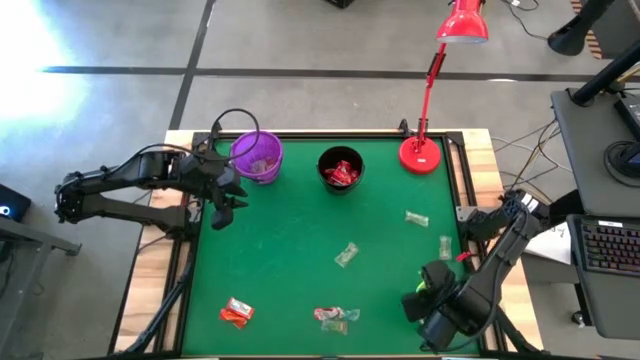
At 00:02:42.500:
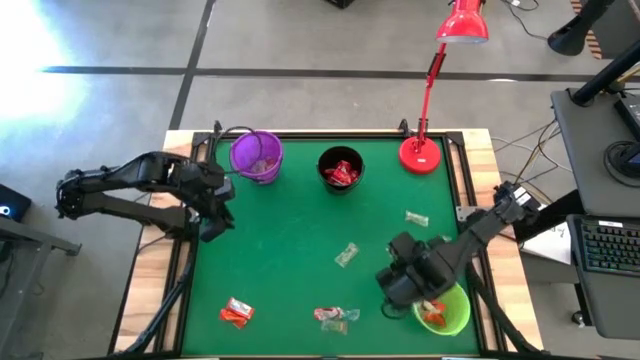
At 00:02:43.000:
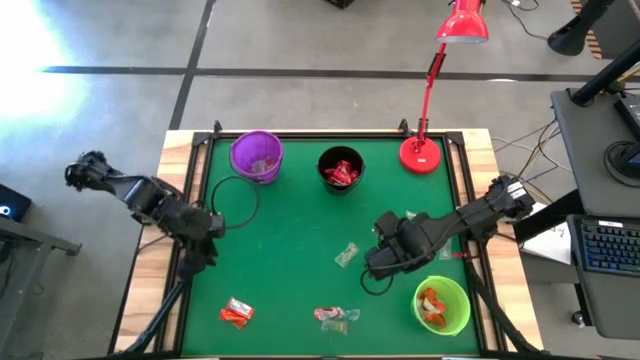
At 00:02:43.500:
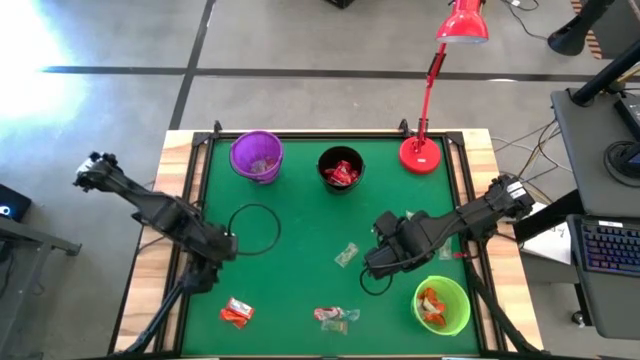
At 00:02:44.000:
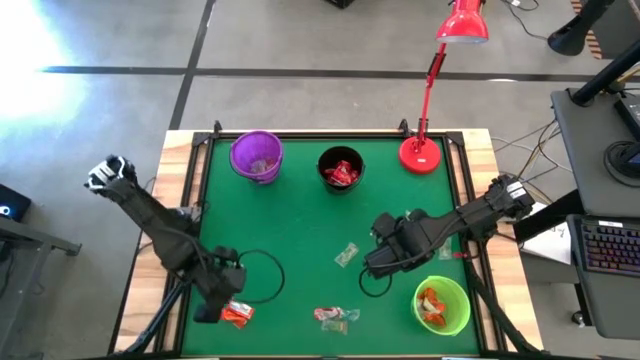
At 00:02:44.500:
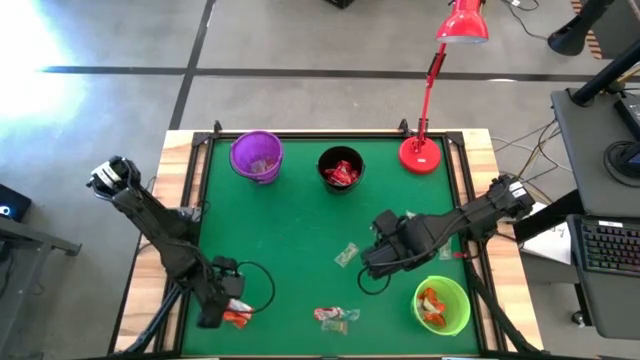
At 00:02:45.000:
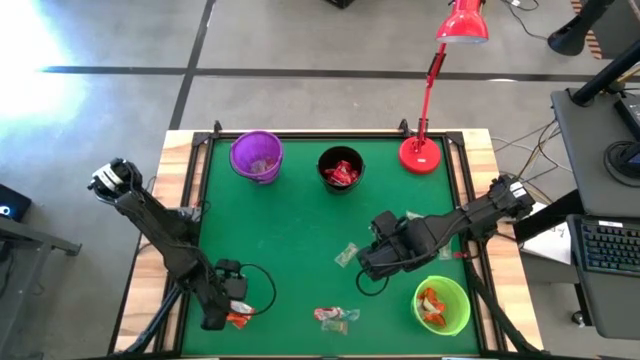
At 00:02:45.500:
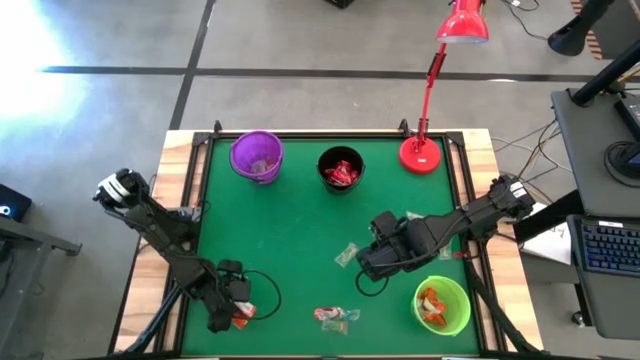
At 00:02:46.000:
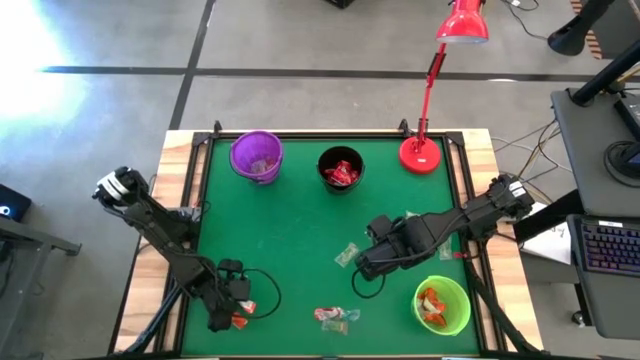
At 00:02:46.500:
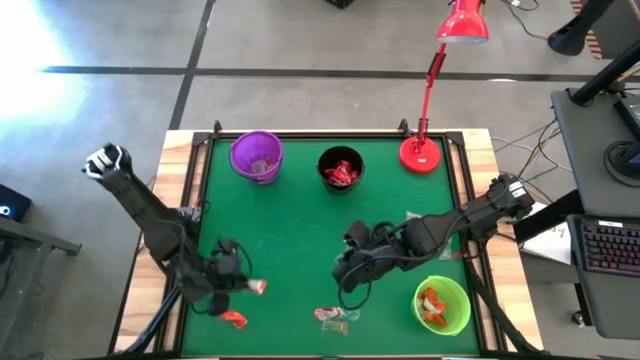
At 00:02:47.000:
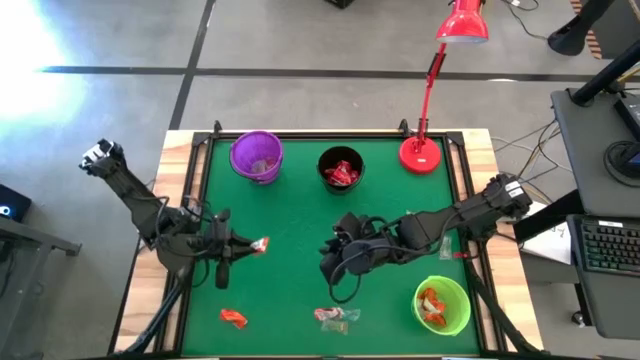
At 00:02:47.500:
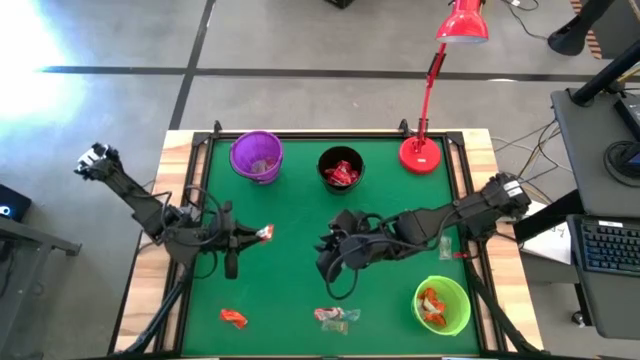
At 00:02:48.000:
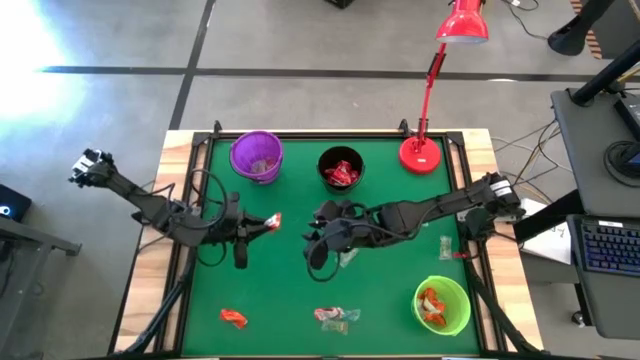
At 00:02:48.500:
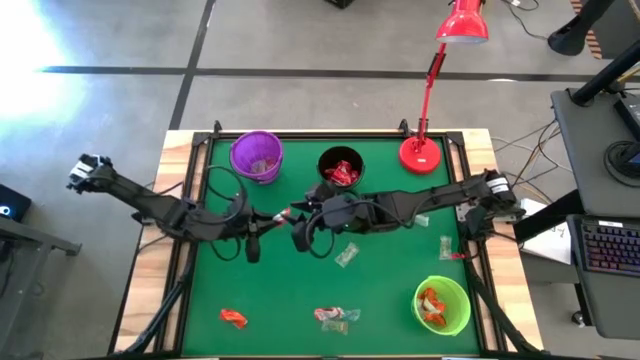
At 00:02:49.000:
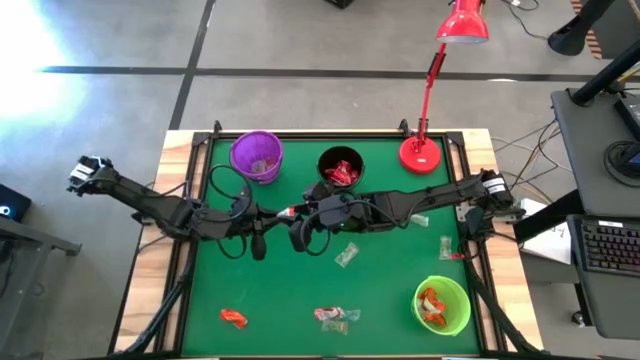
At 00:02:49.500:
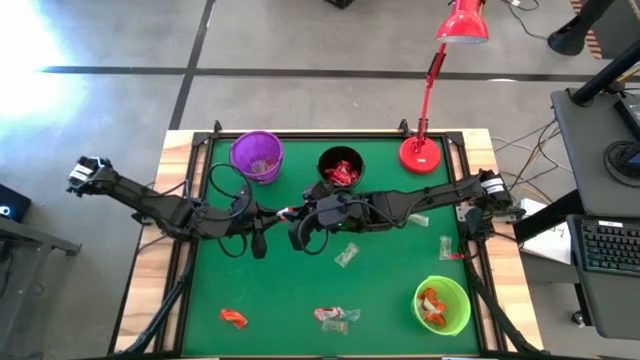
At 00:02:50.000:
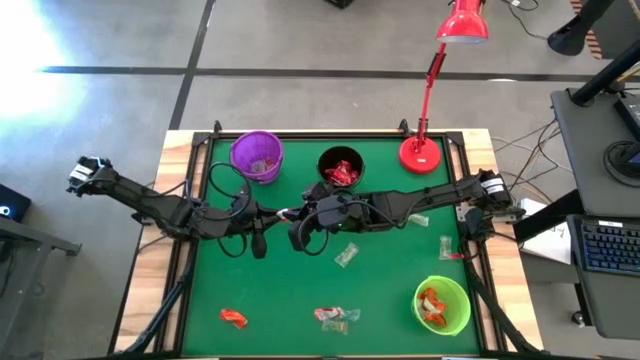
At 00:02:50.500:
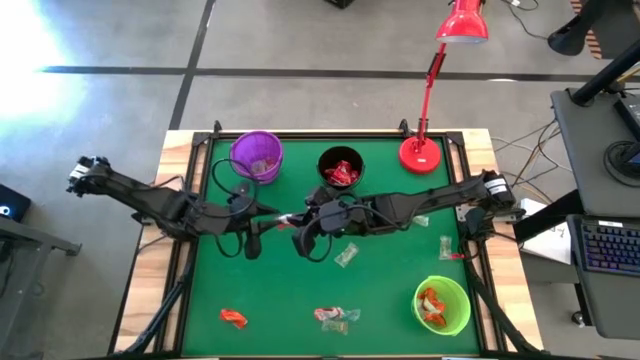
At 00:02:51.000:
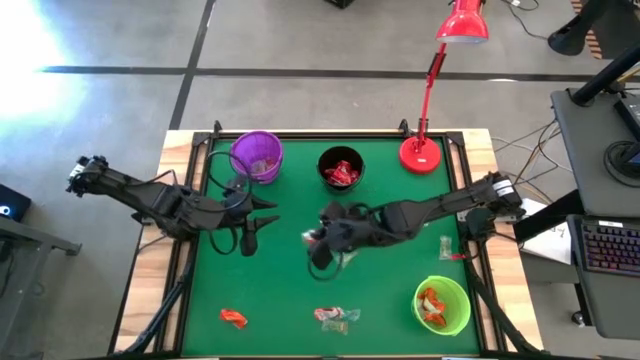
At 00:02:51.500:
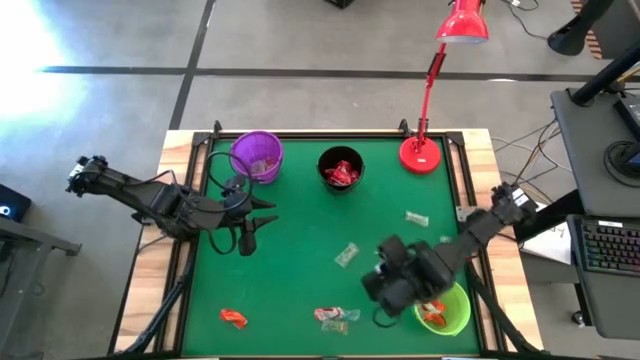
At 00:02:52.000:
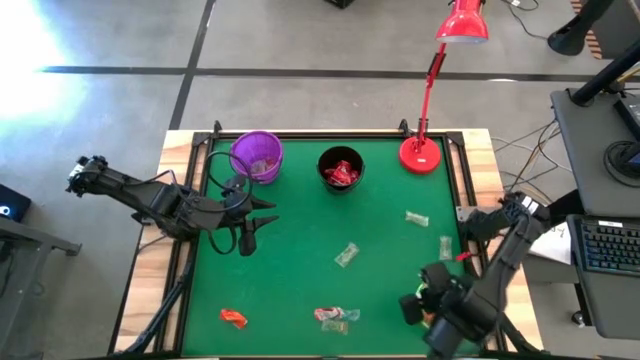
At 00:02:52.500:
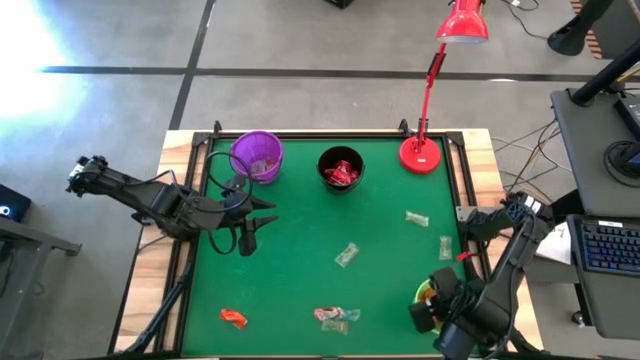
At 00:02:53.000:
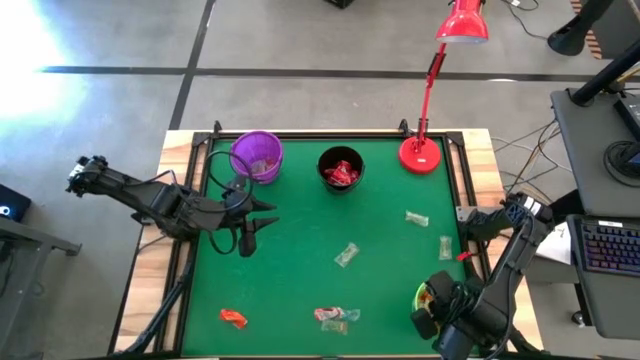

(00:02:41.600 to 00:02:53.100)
Task: Sort candy
Put the orange chocolate into the green bucket

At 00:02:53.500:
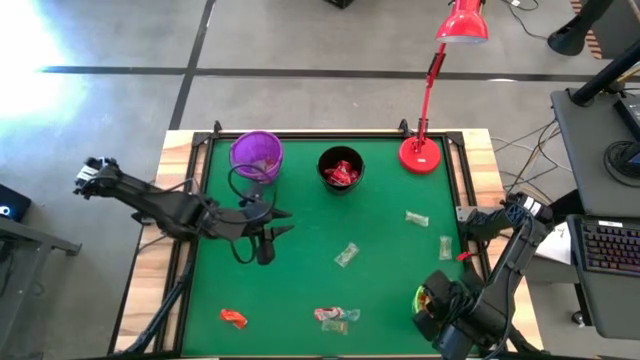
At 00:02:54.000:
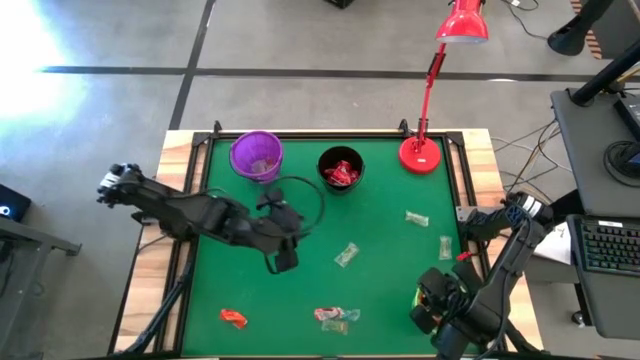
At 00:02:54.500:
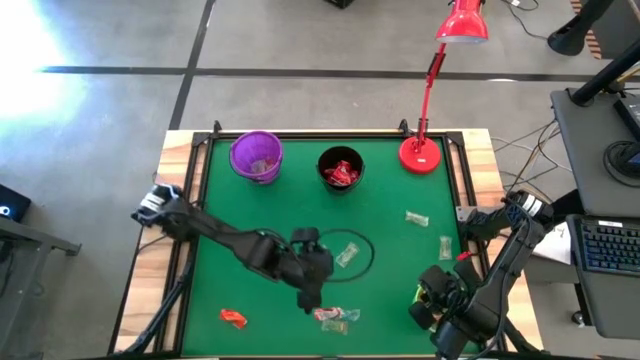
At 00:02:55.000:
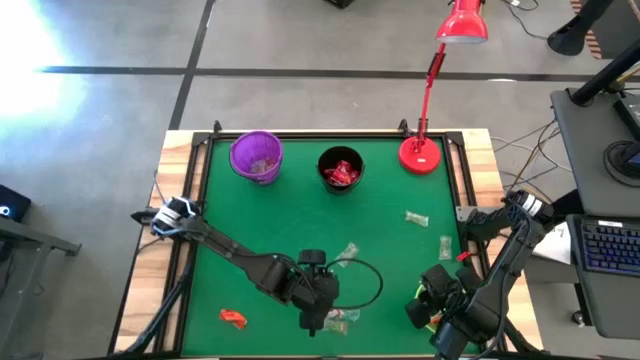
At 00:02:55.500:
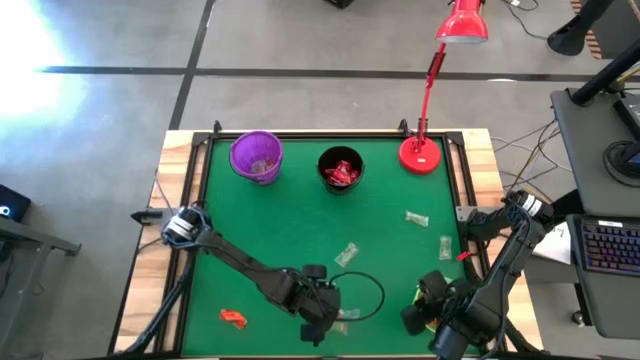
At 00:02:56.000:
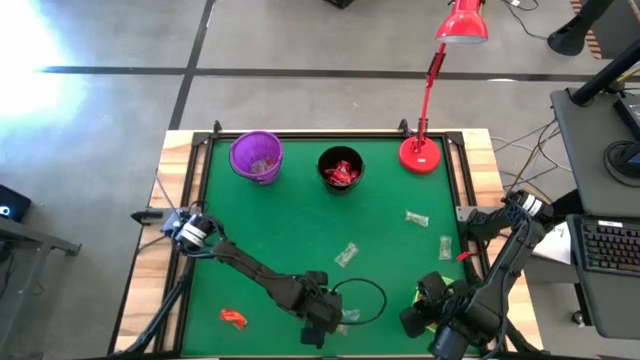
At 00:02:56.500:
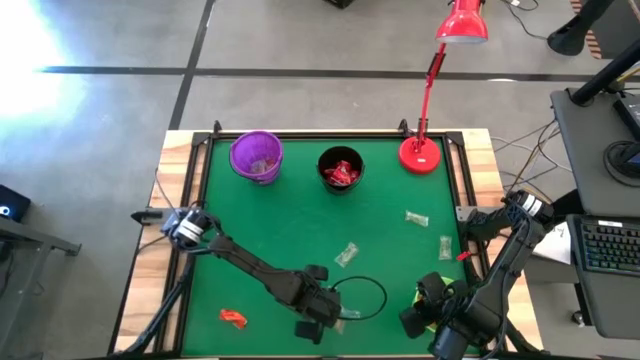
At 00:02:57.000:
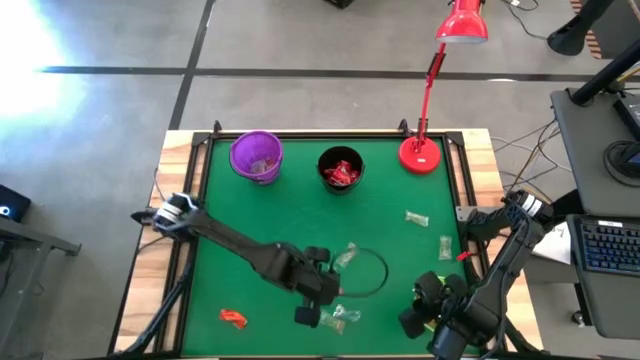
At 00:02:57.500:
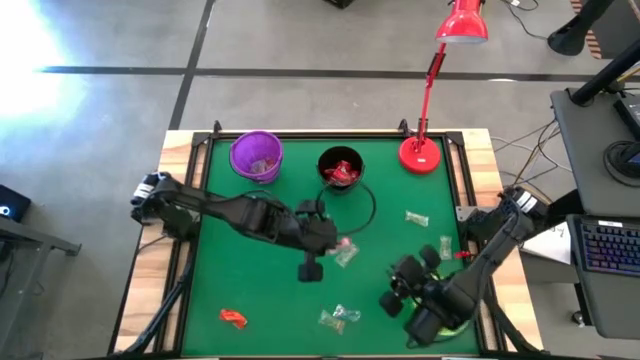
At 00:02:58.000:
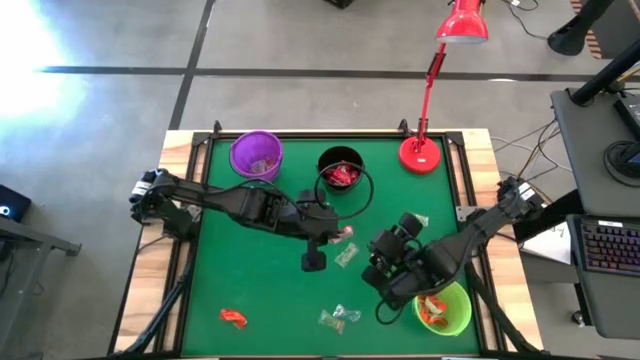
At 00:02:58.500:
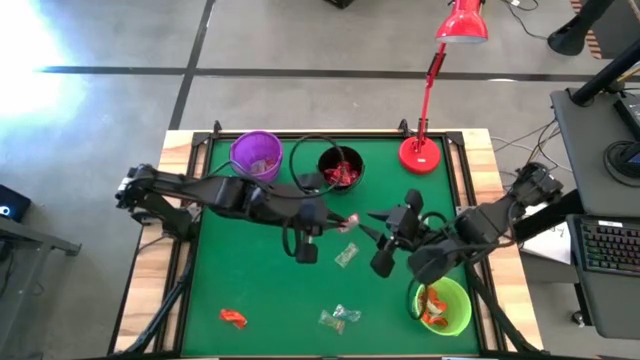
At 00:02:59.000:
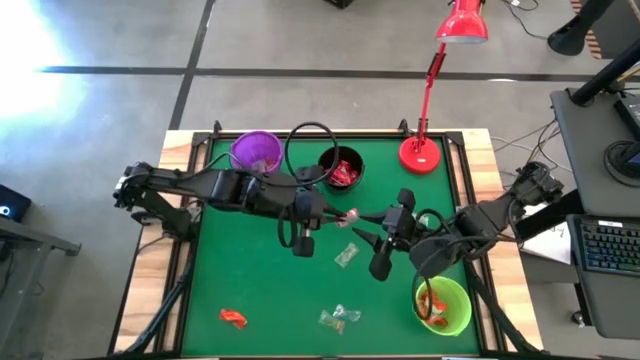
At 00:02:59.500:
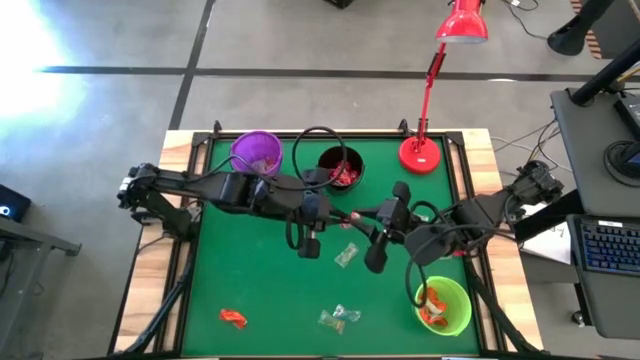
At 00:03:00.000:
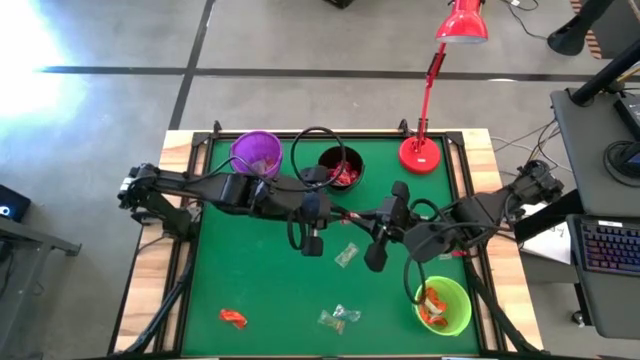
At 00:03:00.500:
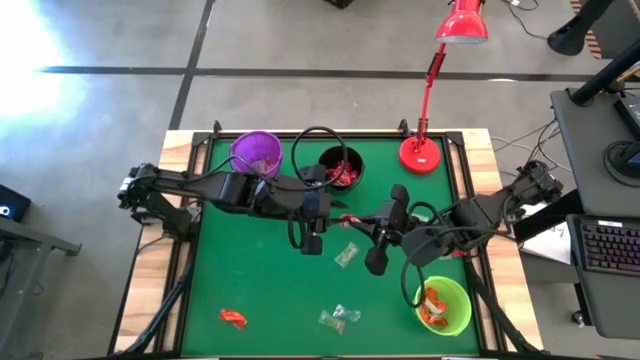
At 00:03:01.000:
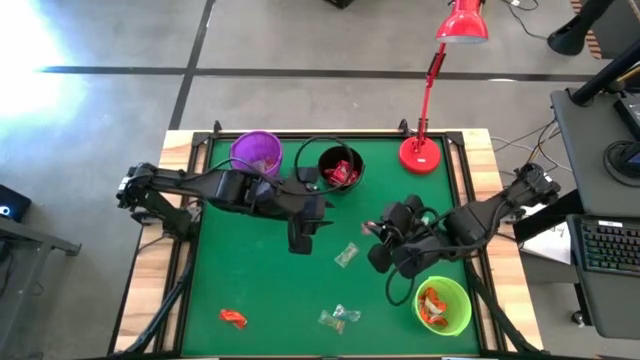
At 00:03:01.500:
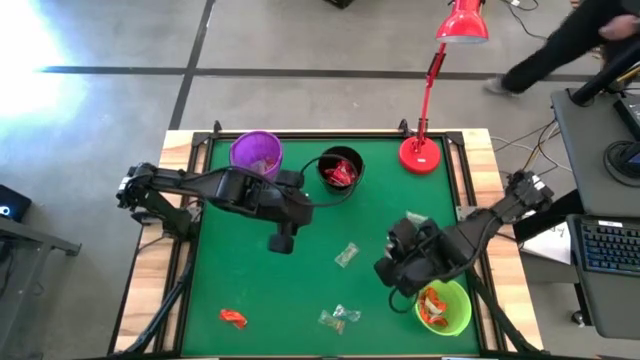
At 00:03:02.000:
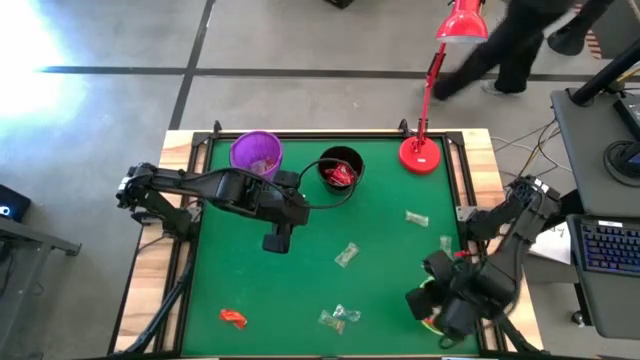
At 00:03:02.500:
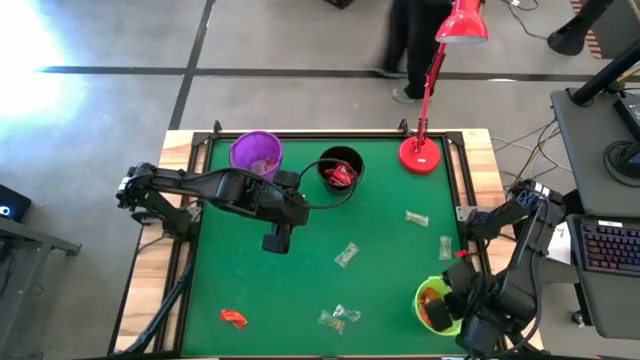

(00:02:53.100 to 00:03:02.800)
Put the orange chocolate into the green bucket
